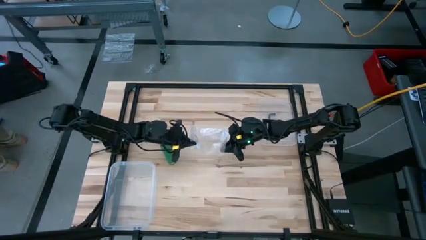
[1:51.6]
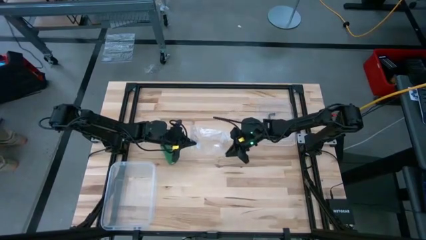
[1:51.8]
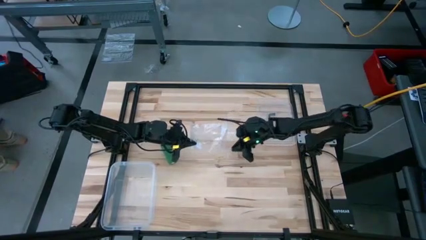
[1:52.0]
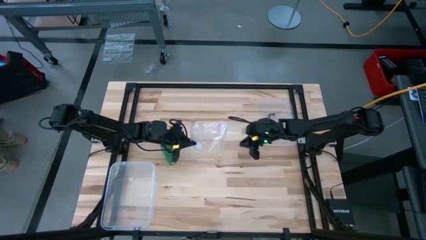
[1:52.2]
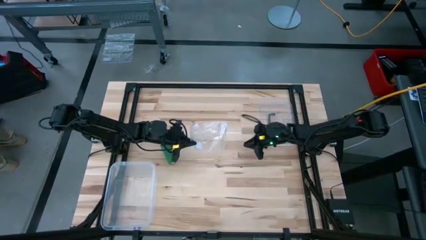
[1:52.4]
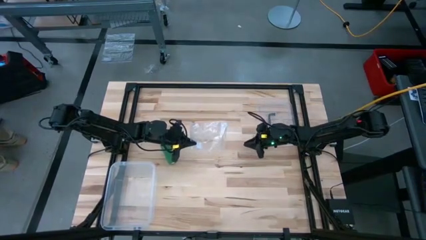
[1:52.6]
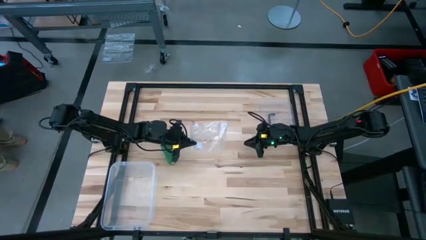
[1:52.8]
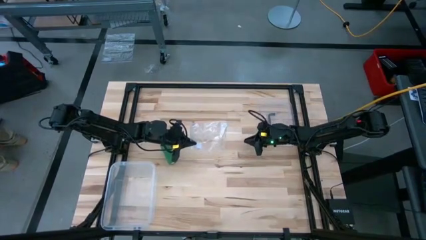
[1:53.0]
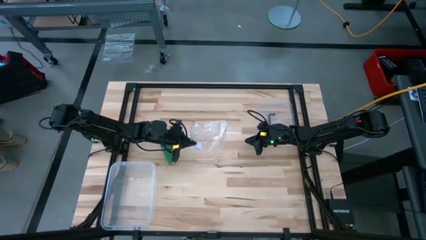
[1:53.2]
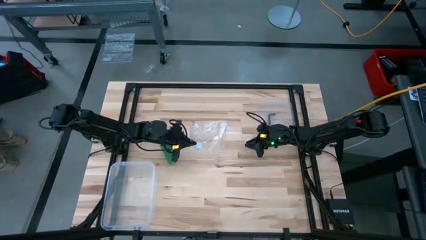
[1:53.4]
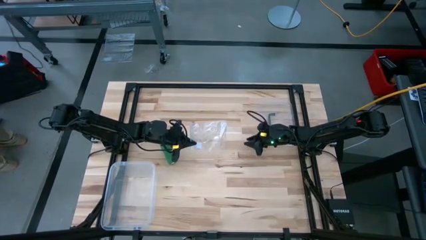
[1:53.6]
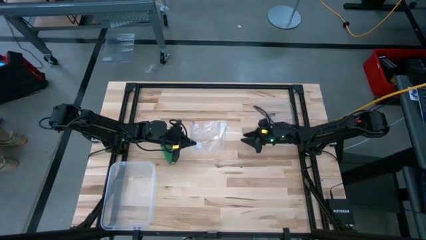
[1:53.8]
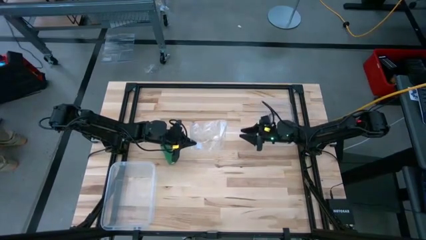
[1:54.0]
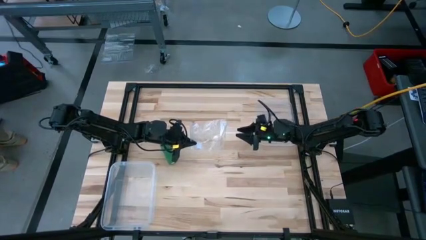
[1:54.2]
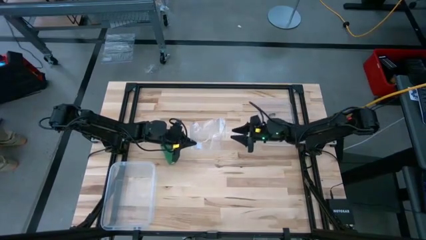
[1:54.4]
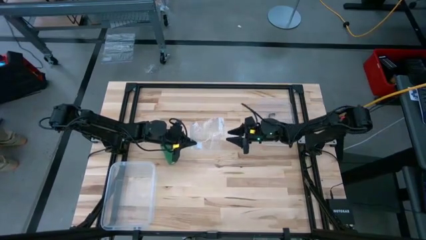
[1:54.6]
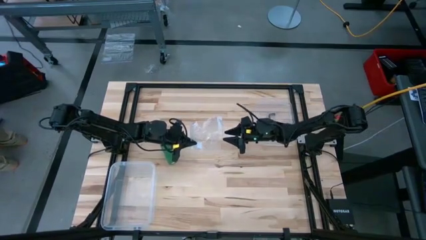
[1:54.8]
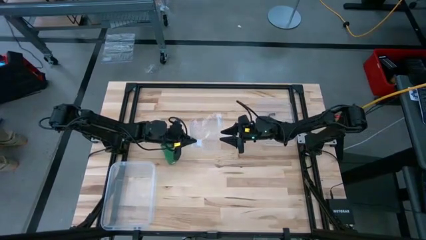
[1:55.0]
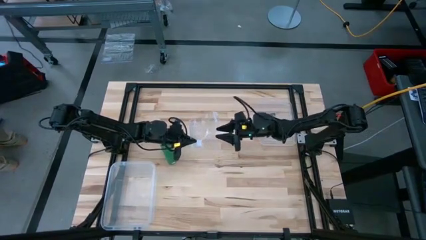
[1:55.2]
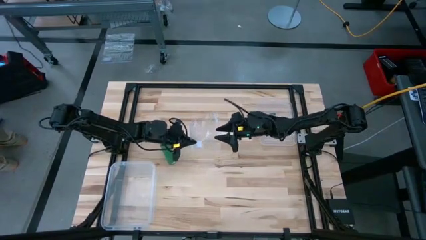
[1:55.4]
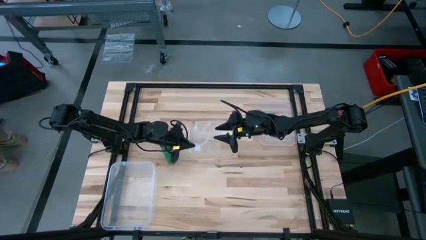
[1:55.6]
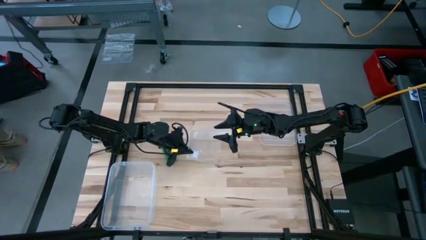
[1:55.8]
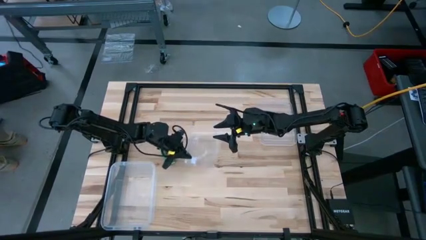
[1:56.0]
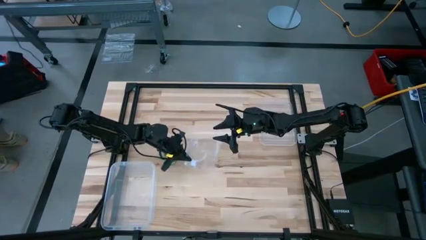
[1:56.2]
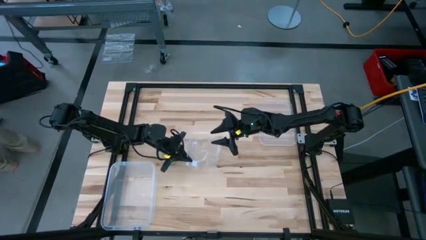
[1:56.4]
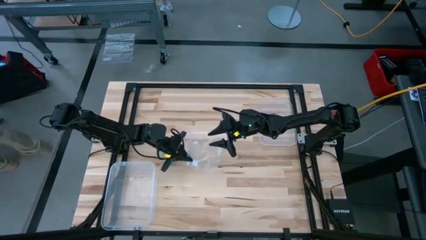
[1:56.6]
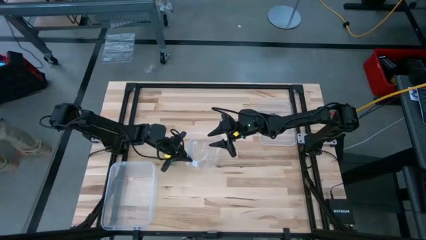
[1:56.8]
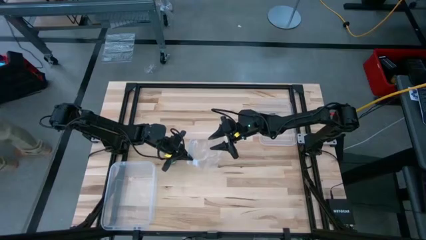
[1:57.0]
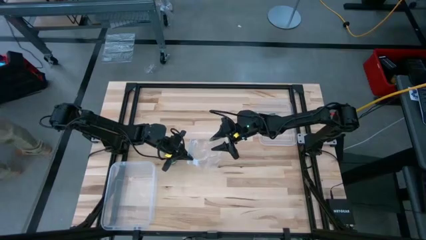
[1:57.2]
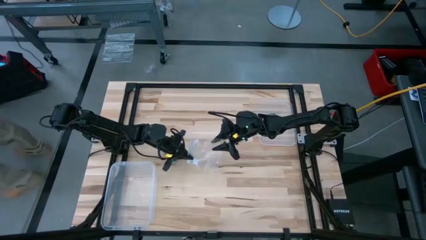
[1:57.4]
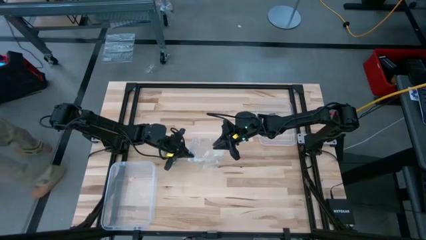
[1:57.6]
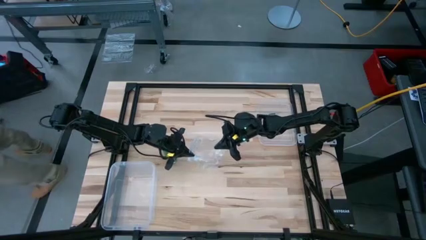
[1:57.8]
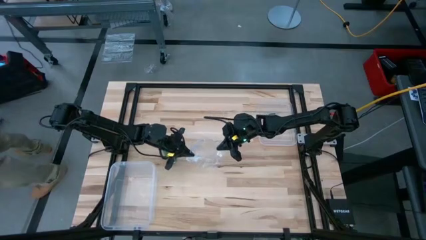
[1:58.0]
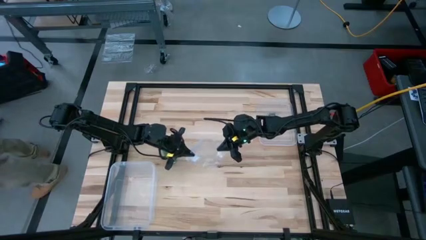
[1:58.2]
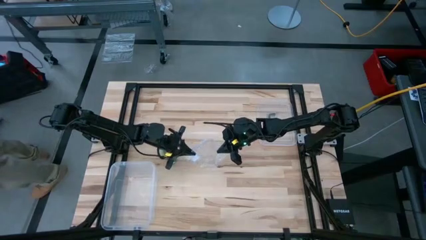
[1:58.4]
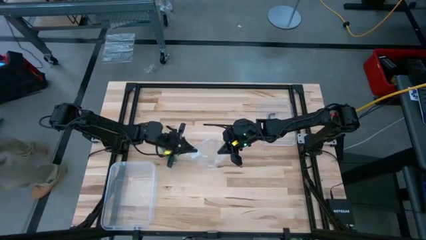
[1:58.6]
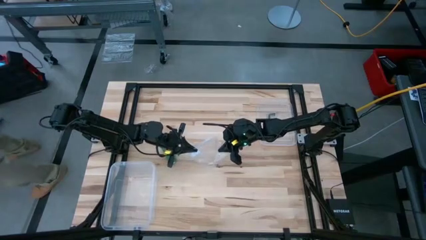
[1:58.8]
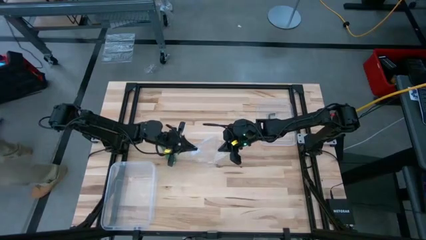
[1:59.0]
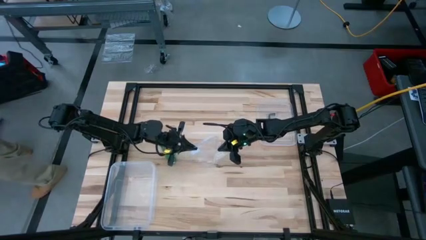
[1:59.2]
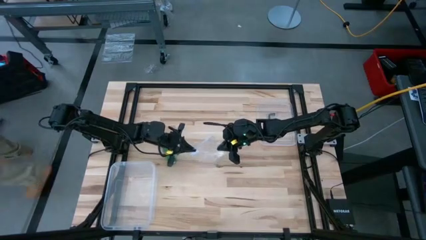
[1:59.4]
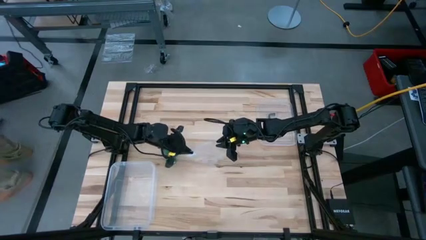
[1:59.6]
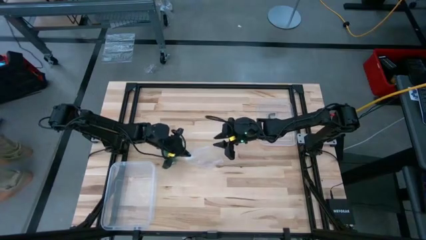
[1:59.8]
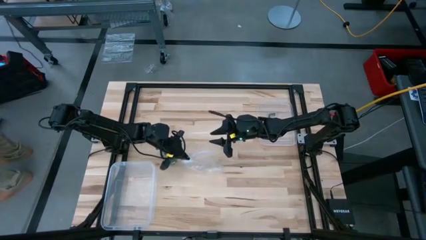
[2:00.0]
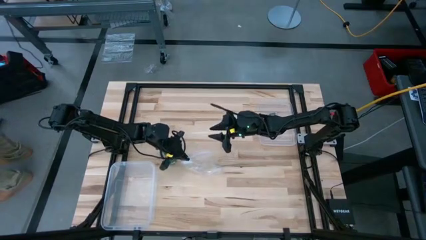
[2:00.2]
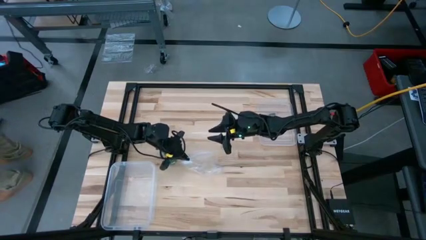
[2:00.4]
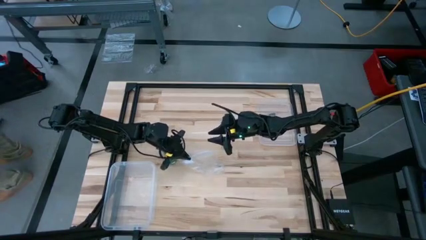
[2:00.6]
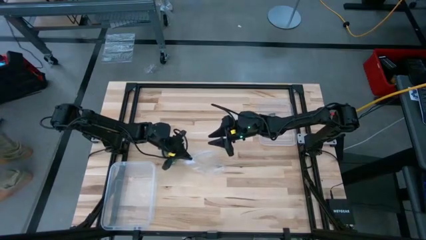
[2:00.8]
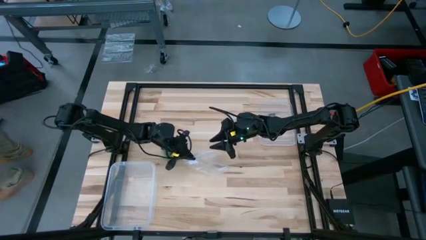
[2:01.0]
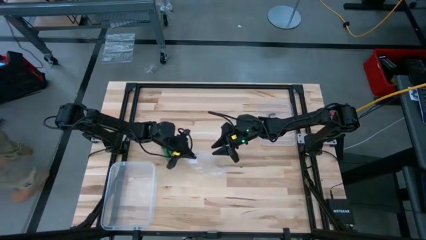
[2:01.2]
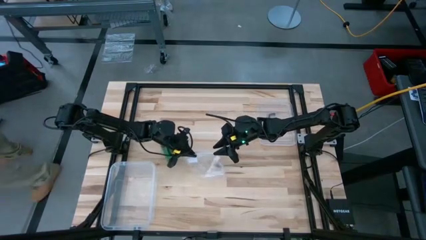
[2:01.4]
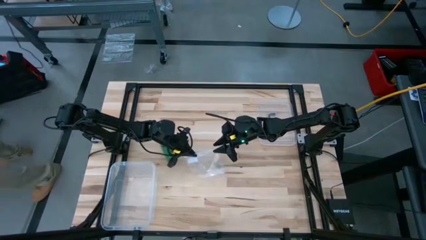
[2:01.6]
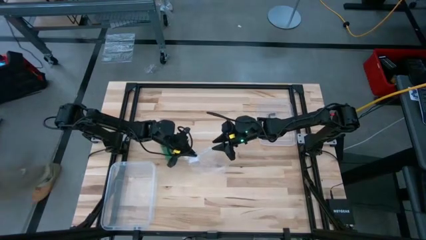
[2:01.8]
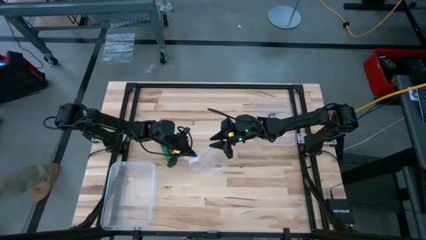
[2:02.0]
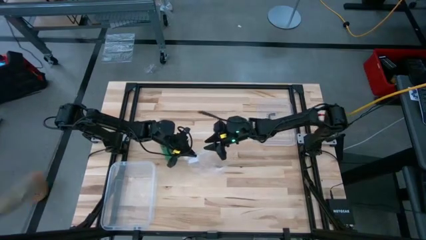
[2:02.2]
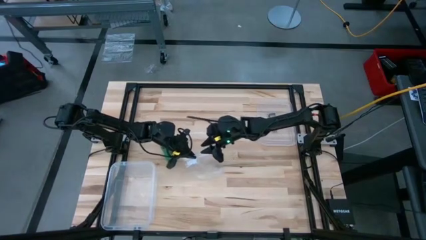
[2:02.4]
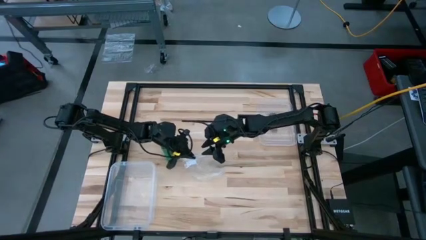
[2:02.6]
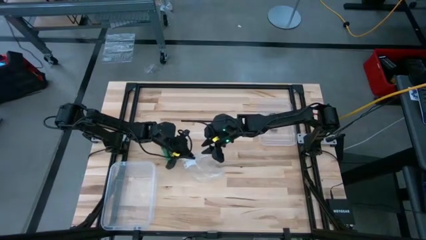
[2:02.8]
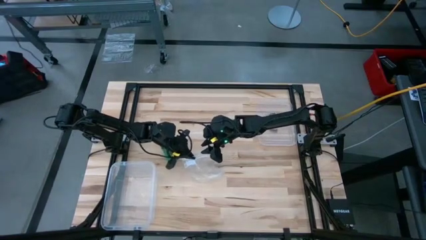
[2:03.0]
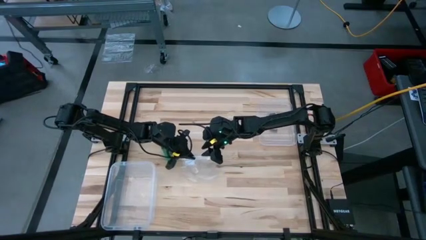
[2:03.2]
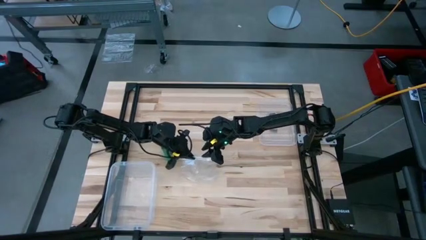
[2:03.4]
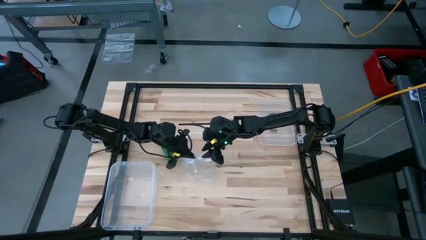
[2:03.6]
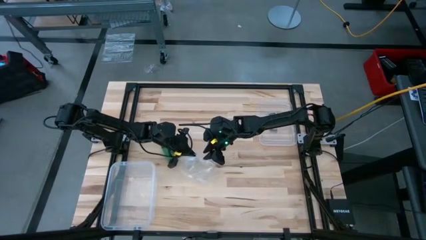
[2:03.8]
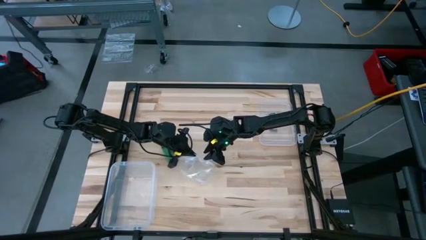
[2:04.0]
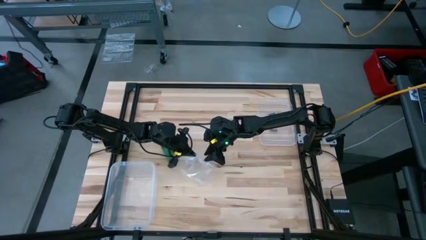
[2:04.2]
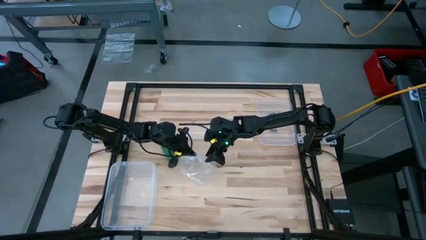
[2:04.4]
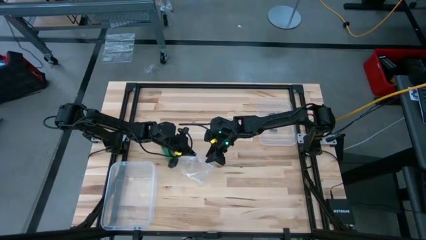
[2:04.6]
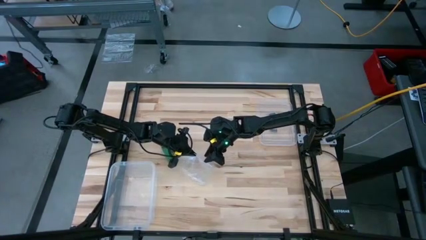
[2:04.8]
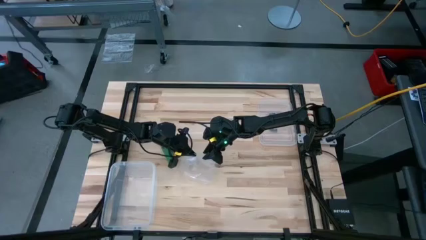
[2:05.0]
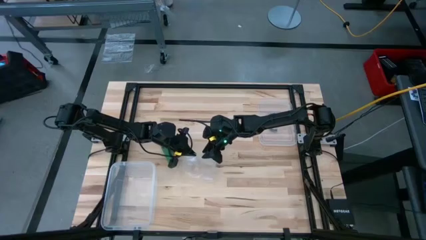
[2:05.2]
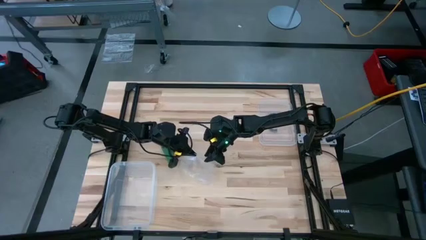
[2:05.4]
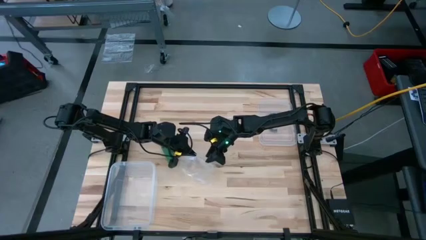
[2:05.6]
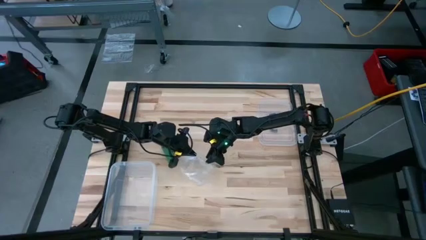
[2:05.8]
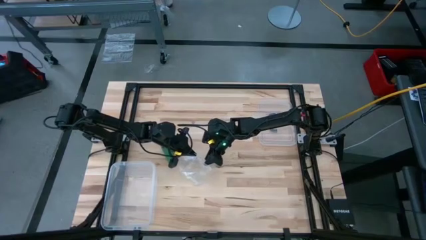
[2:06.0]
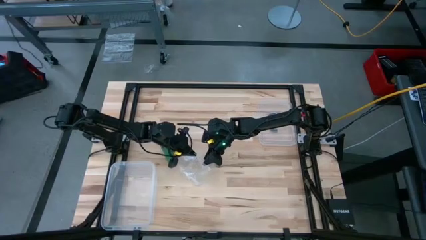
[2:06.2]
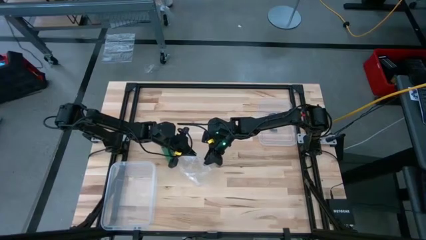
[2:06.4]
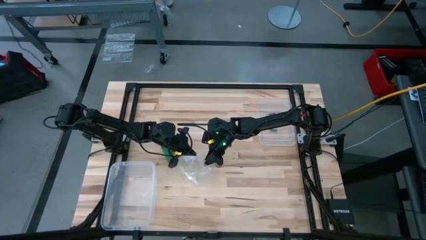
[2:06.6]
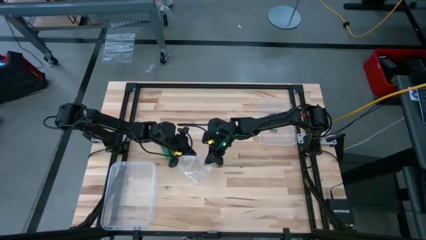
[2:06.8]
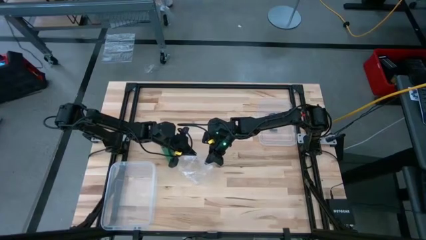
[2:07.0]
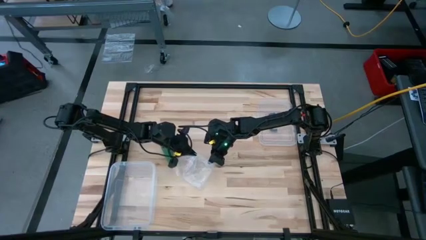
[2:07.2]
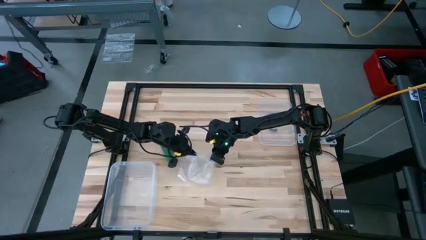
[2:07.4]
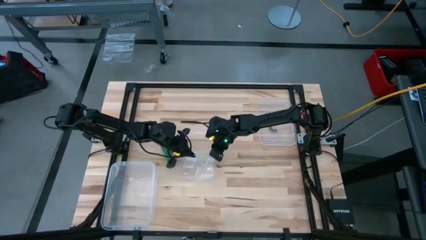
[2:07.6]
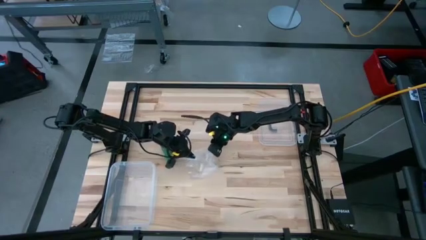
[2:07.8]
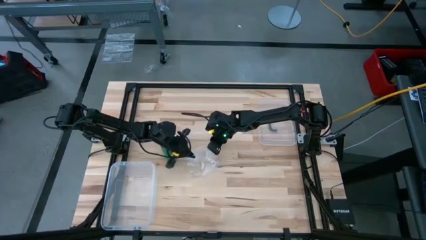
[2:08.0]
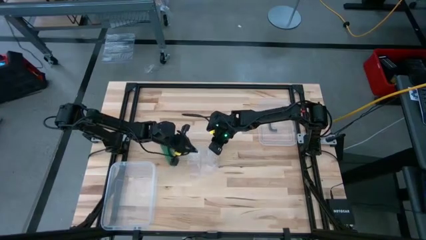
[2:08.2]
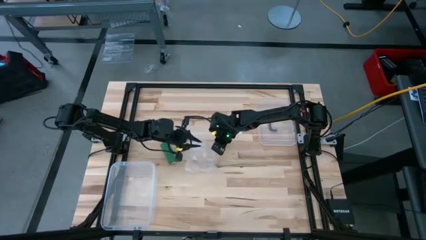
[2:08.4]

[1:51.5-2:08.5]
Task: Roll bandage
Open the zip bag
